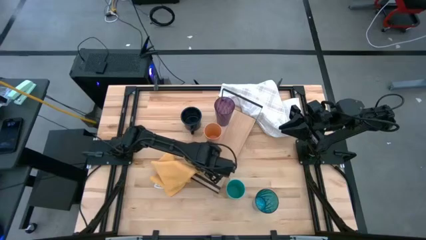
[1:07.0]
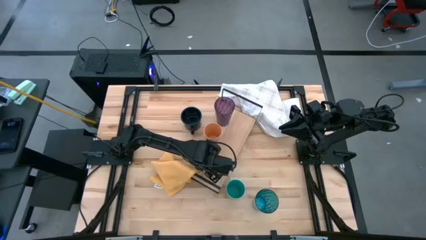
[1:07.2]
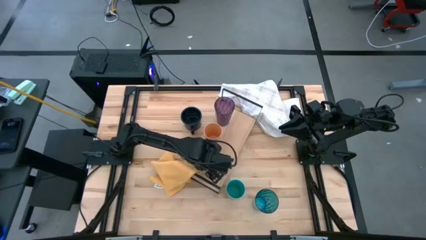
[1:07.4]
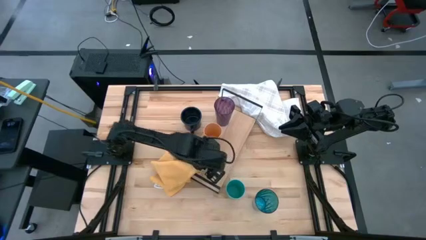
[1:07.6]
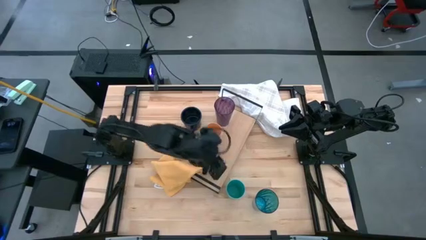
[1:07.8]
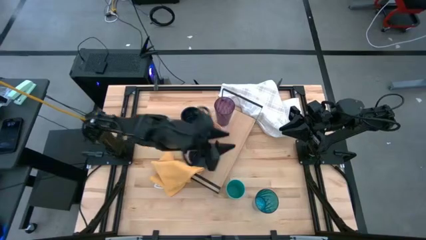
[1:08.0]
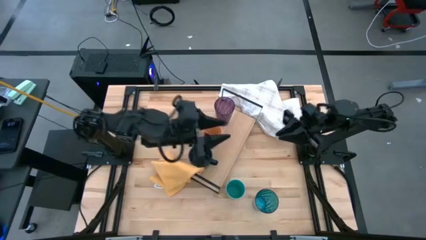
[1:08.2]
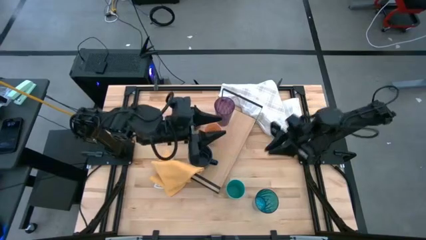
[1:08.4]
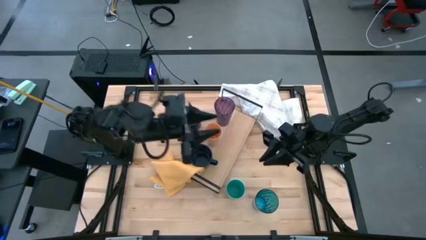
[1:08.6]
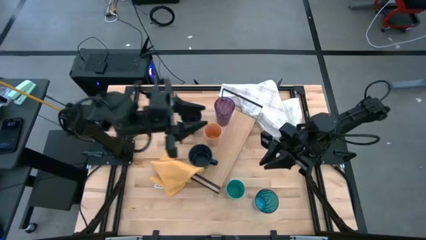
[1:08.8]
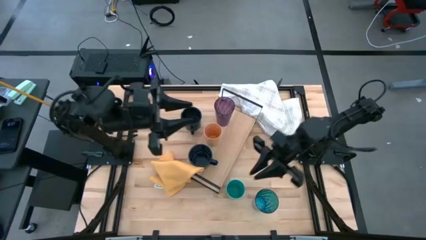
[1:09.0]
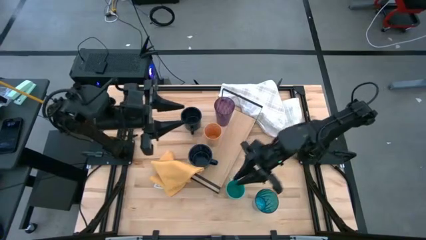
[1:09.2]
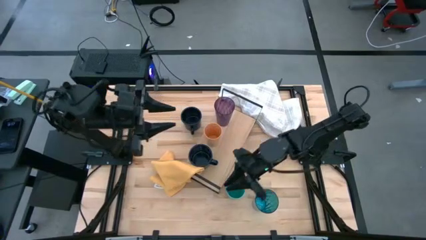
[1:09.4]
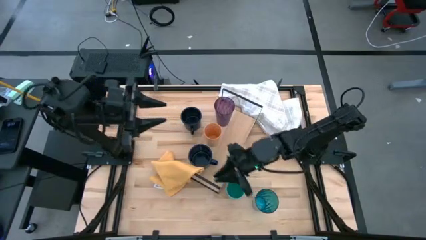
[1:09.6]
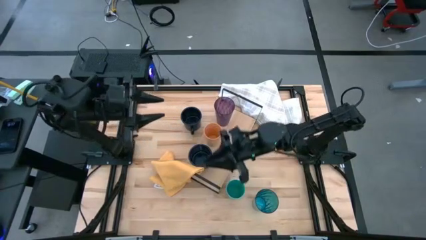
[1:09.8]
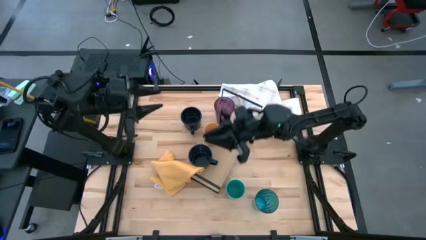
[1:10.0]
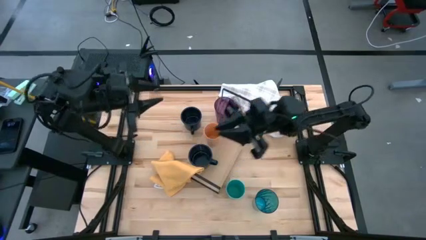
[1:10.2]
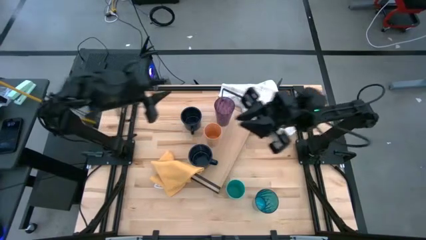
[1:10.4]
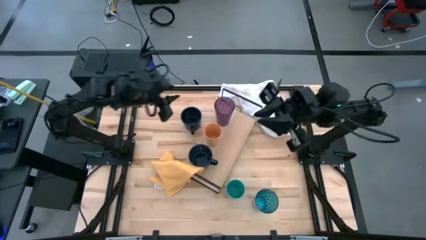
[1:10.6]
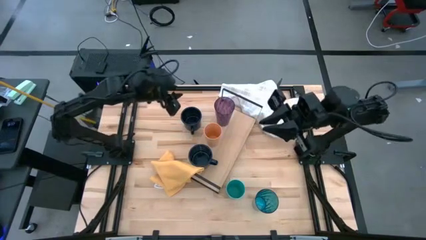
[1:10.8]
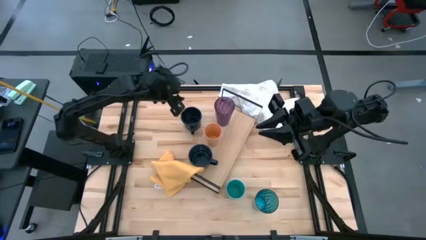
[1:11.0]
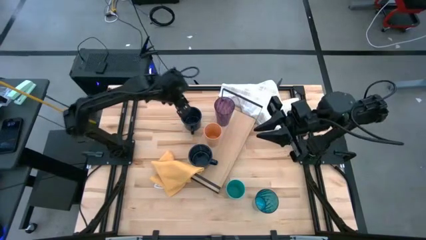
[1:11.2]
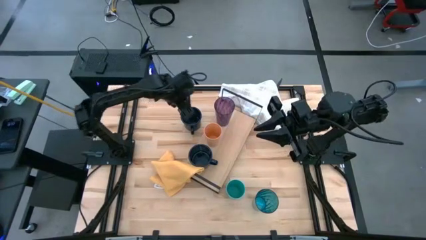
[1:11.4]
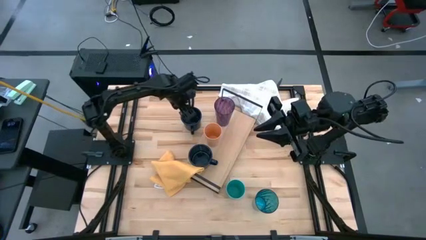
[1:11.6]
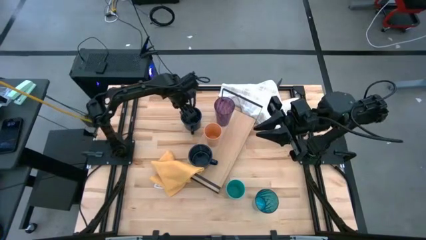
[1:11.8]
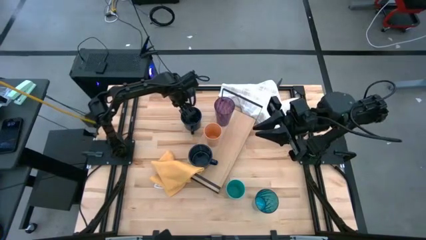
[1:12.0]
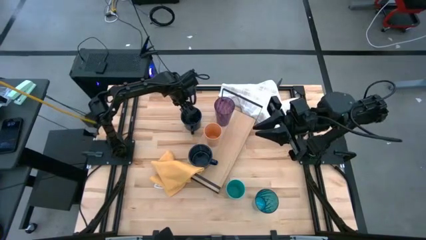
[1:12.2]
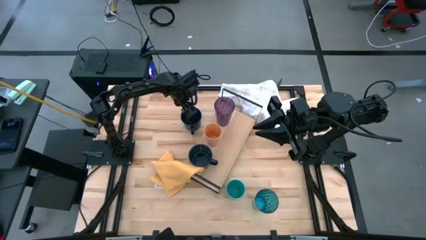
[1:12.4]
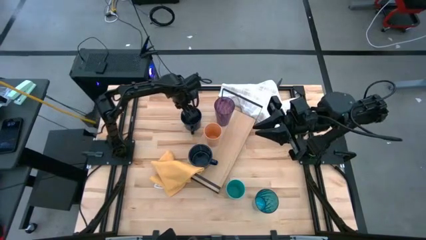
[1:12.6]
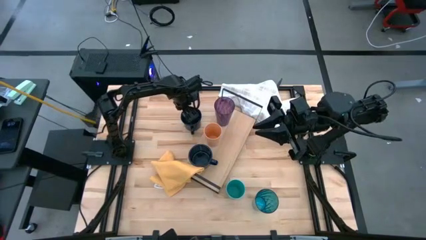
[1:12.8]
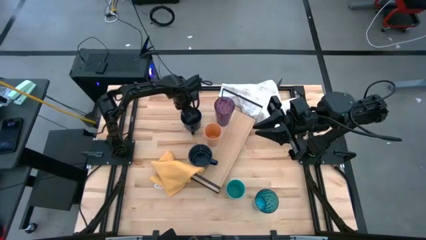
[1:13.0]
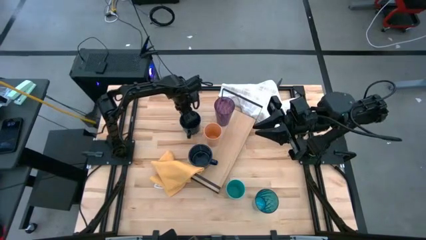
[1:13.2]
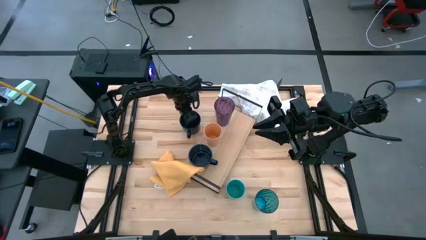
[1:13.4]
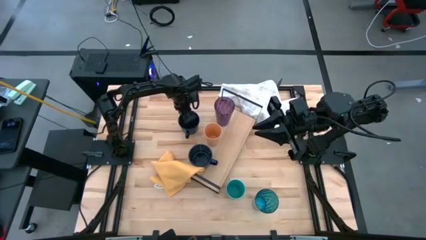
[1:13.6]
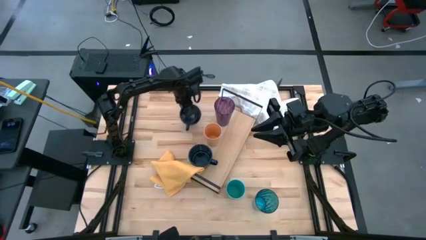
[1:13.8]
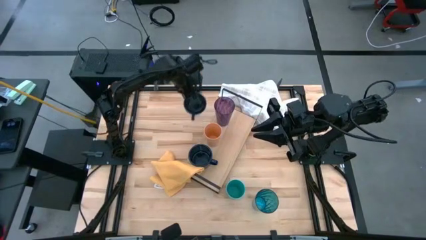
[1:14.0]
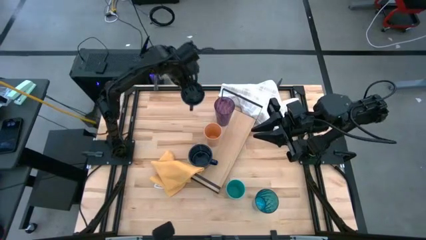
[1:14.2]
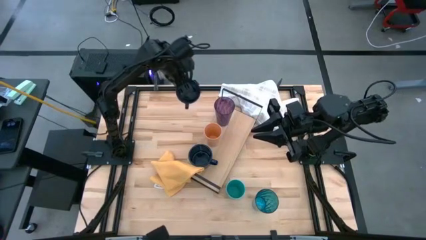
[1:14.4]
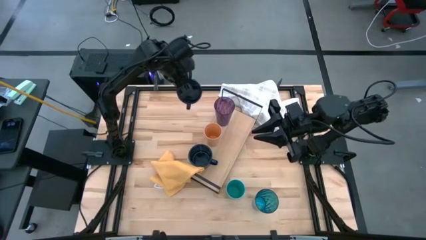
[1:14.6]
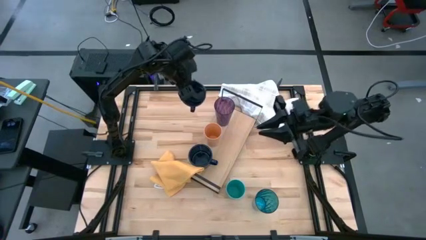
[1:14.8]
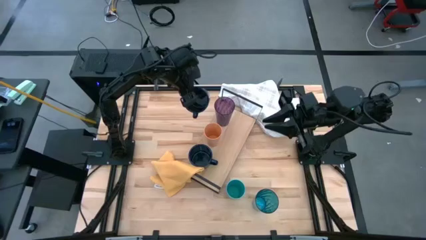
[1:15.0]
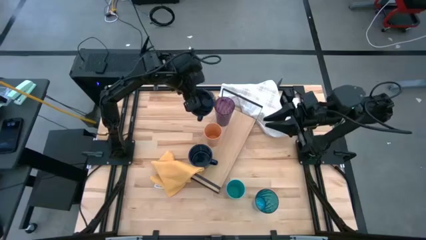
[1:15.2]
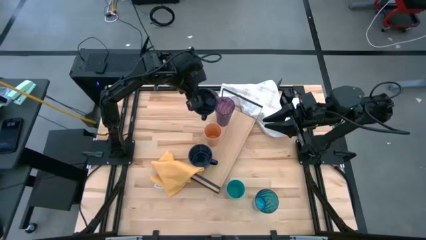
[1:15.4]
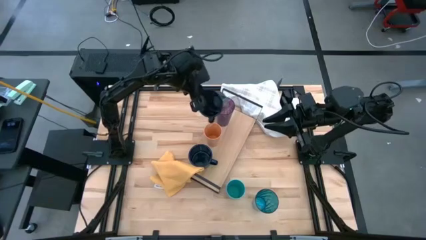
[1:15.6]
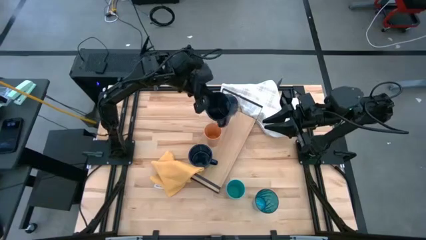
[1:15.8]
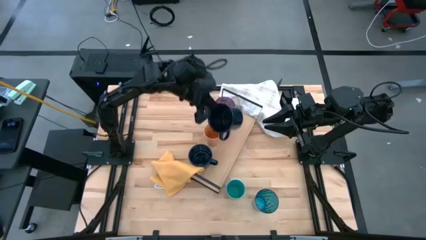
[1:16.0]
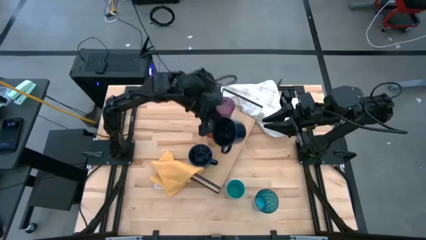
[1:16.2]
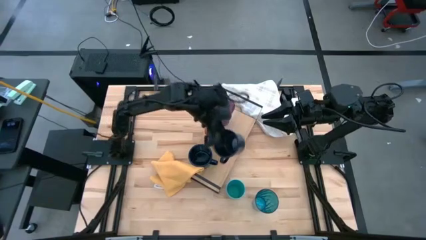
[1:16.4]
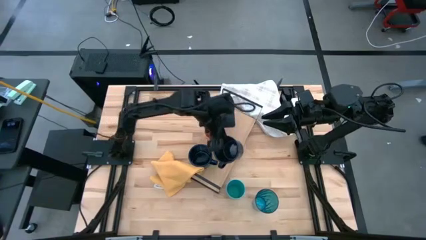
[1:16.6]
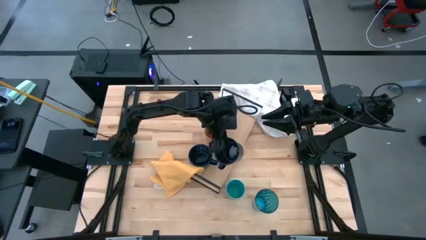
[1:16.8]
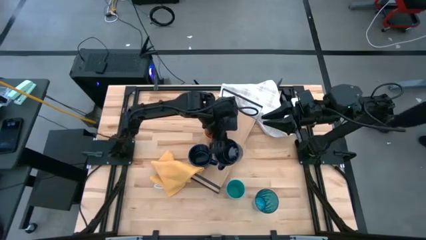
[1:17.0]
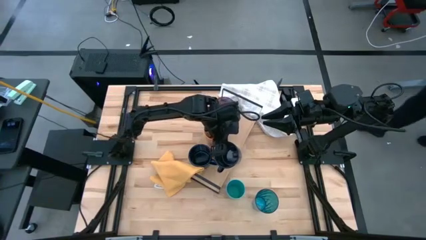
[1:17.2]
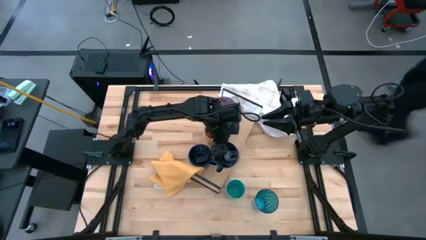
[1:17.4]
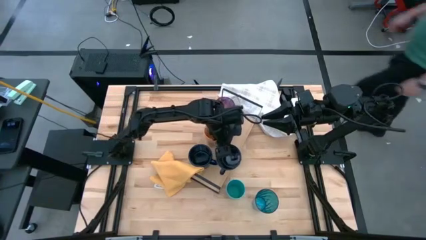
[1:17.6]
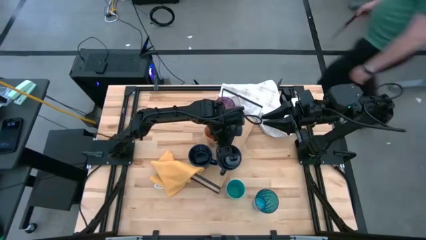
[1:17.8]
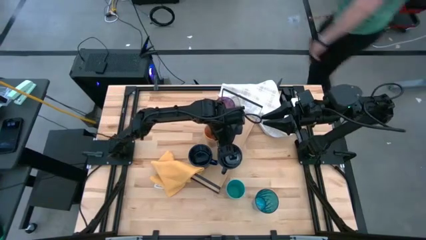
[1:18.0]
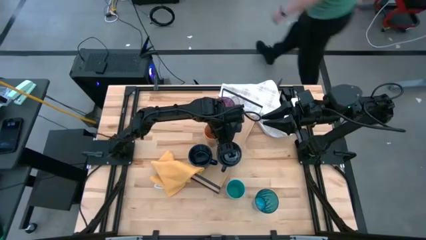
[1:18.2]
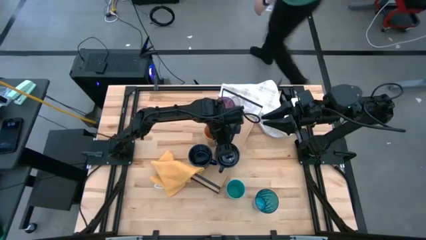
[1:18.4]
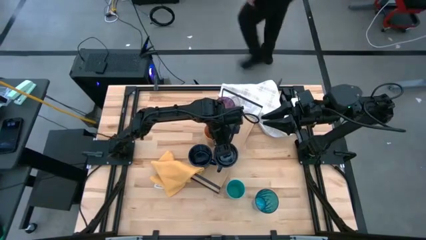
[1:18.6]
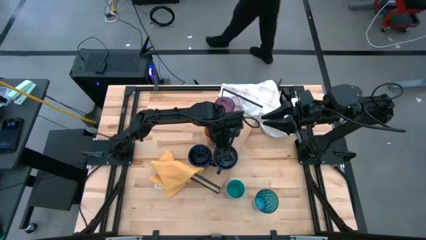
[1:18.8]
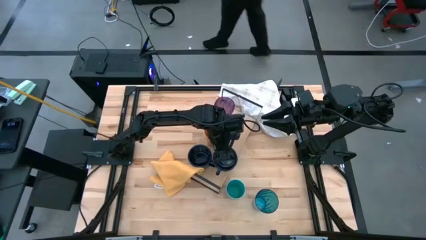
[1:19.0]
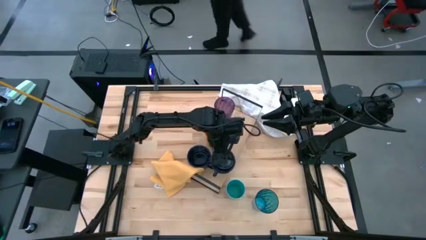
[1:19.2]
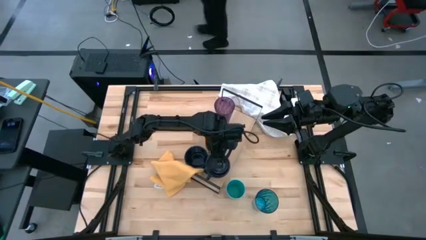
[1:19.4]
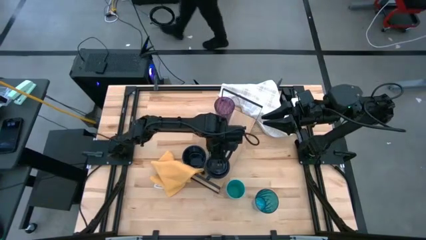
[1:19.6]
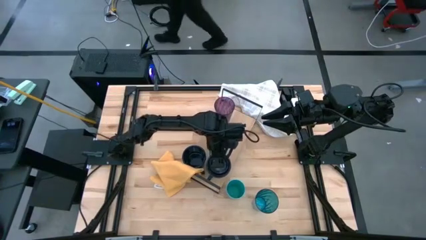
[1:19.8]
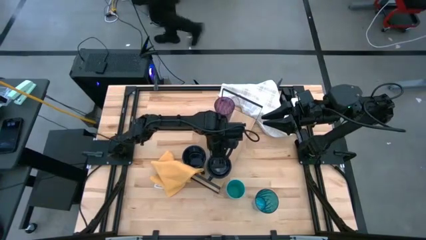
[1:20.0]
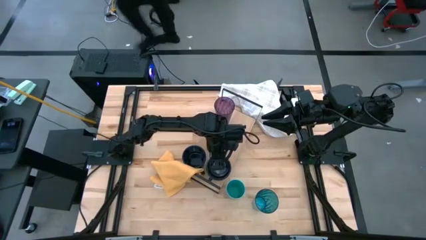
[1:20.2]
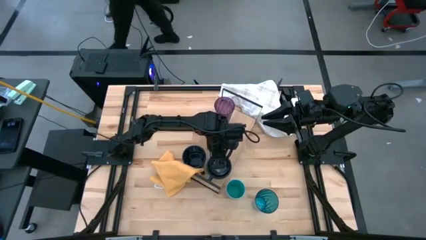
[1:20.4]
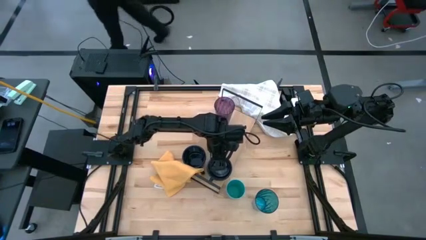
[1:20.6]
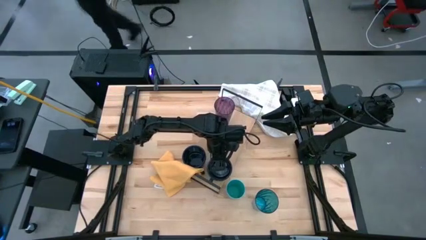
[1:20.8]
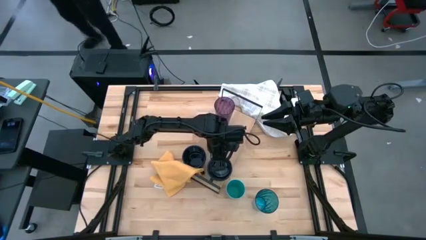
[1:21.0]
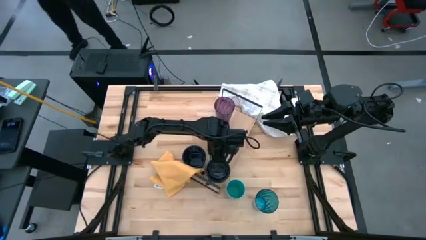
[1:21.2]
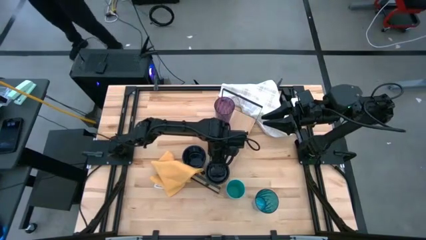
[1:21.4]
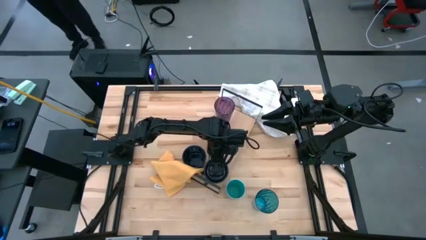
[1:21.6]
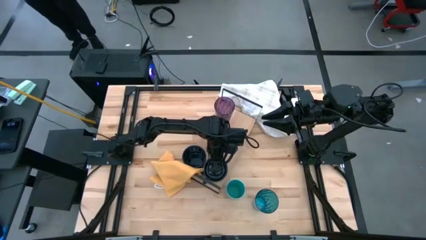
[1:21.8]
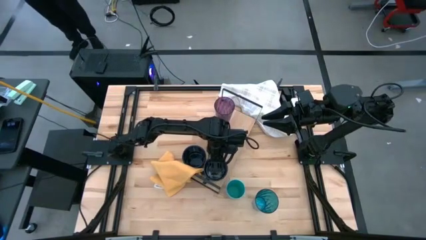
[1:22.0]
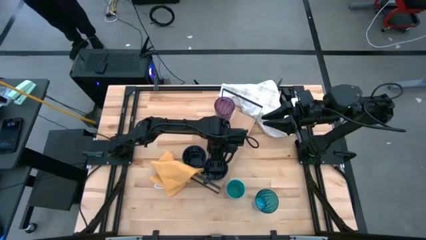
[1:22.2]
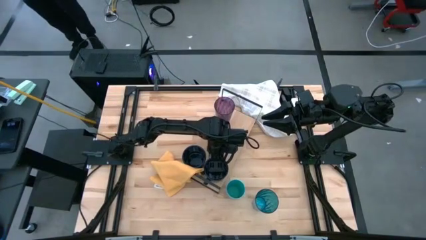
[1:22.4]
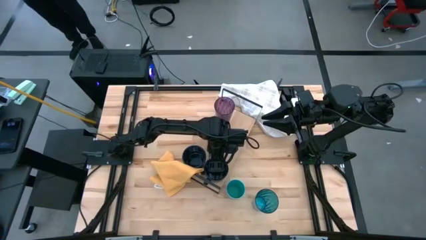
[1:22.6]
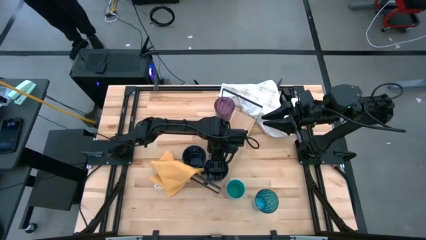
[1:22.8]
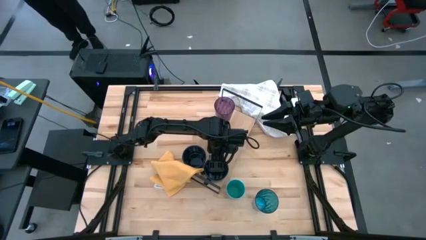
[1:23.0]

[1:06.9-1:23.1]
Task: Stack small to large cups/mugs on shelf
Put the dark blue mug on the shelf
